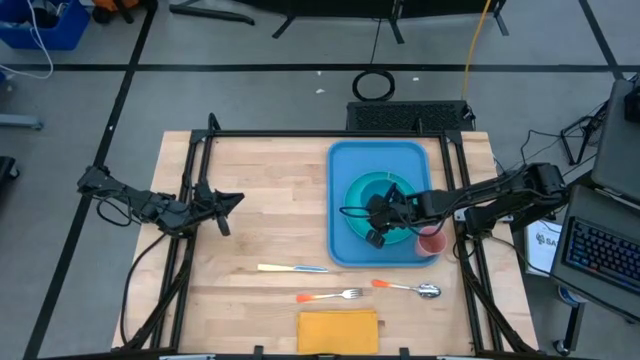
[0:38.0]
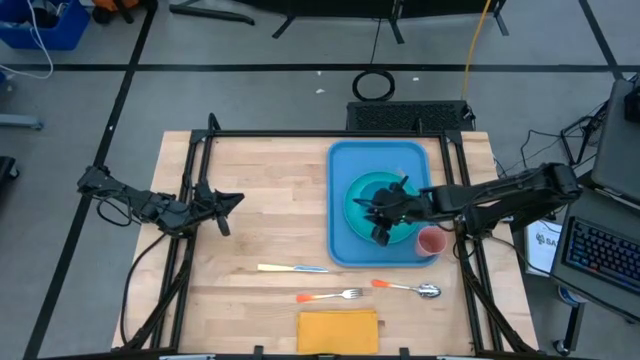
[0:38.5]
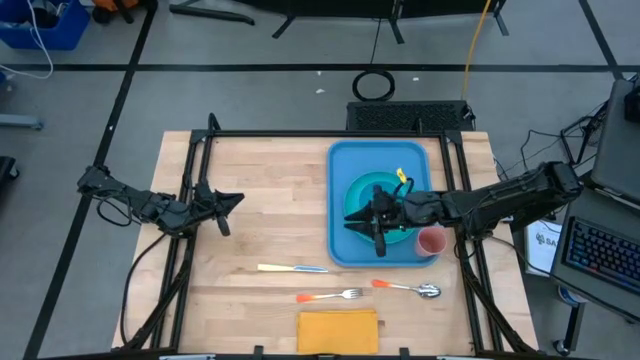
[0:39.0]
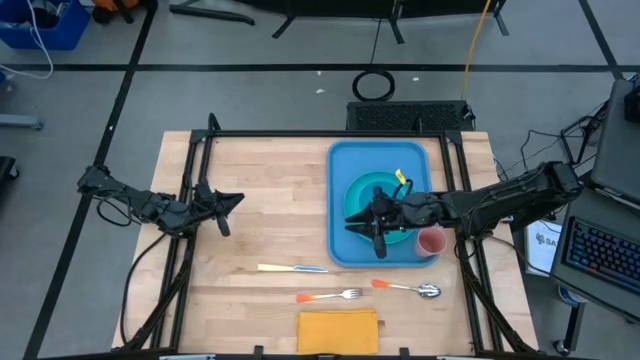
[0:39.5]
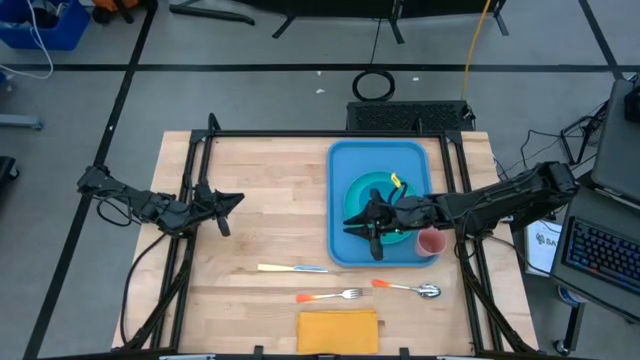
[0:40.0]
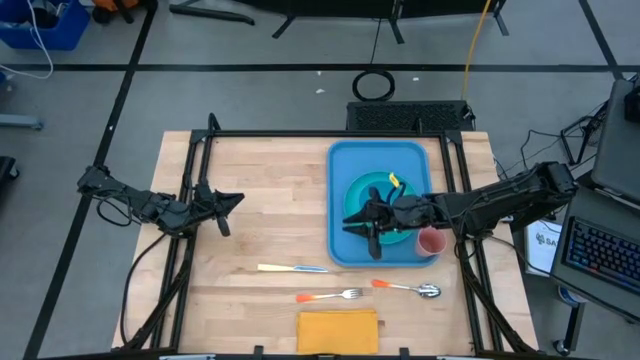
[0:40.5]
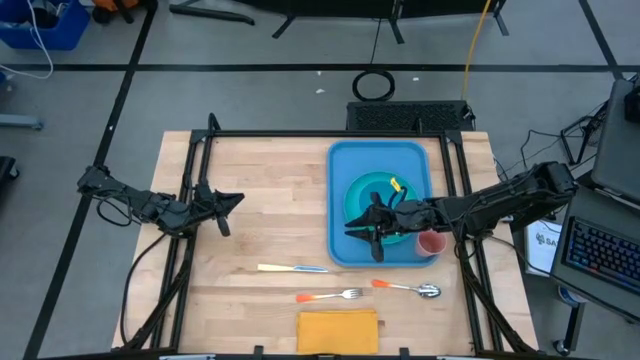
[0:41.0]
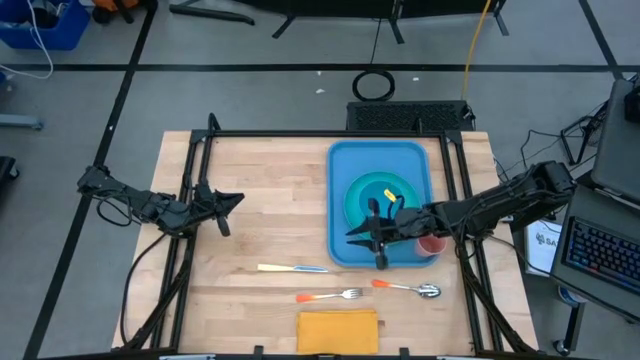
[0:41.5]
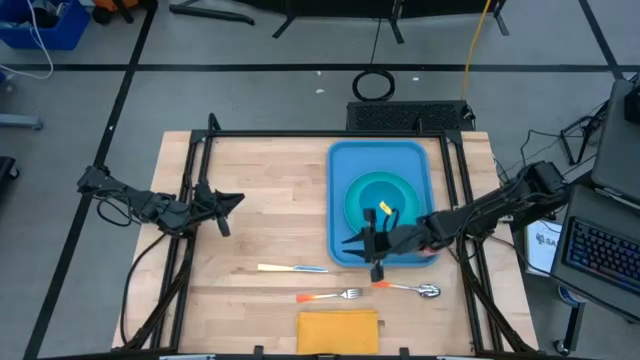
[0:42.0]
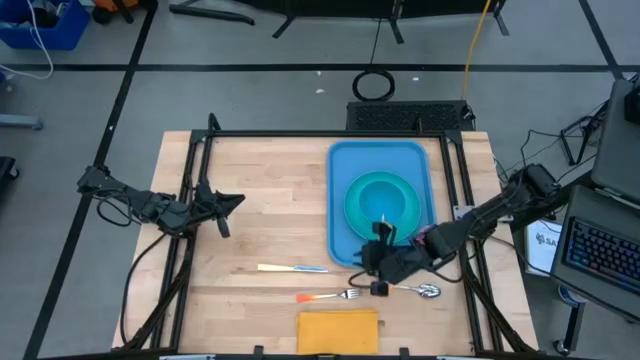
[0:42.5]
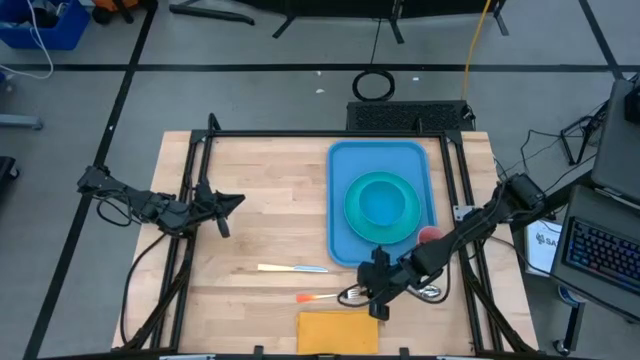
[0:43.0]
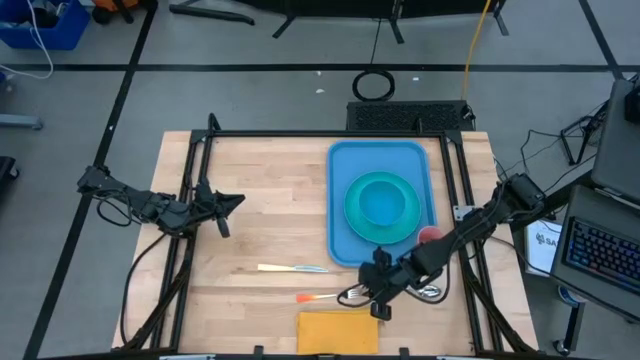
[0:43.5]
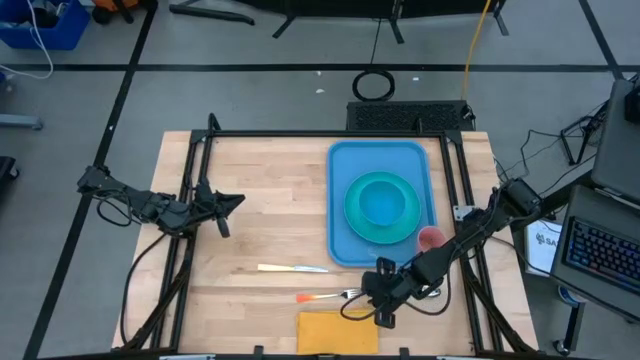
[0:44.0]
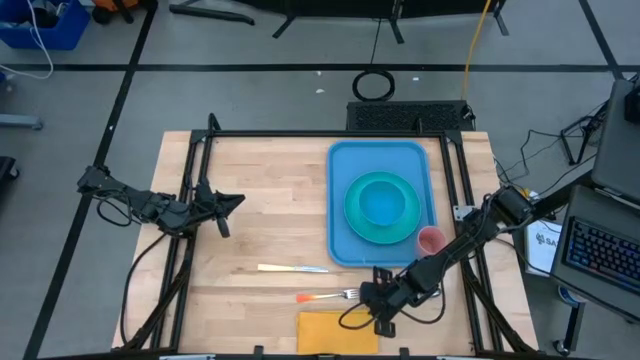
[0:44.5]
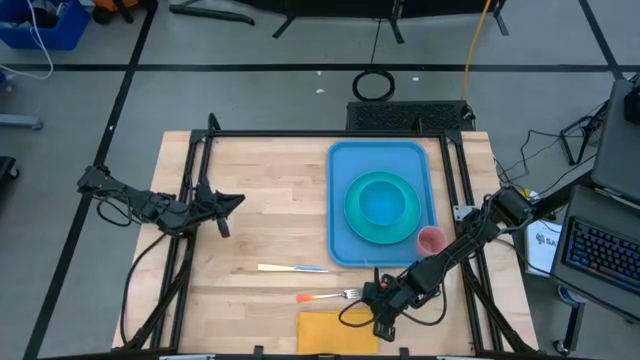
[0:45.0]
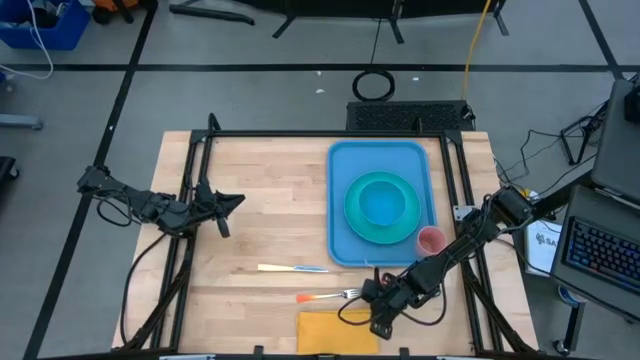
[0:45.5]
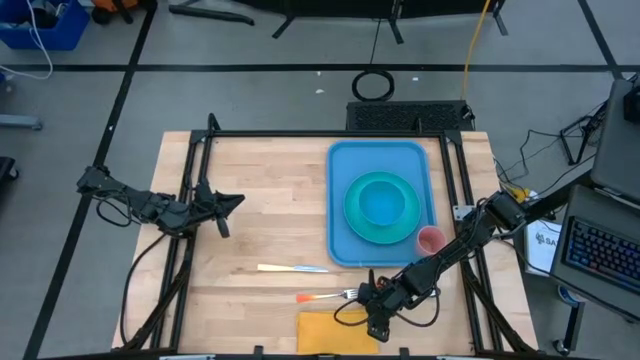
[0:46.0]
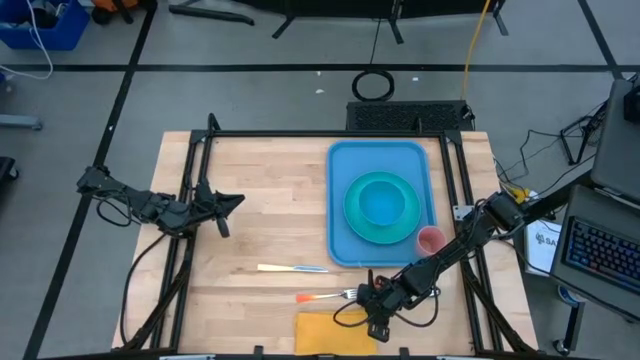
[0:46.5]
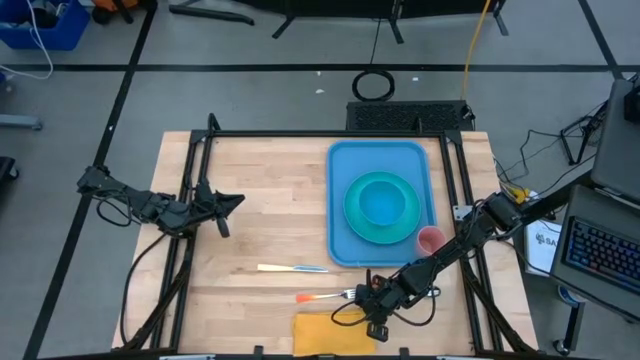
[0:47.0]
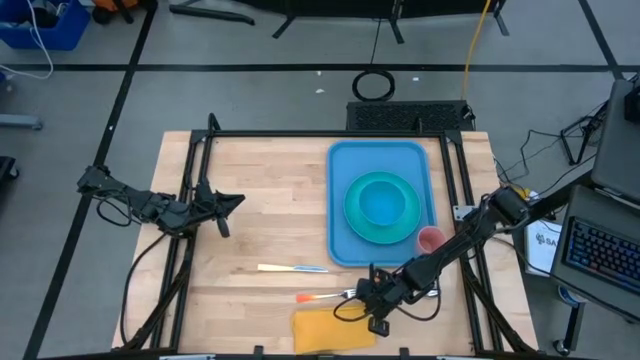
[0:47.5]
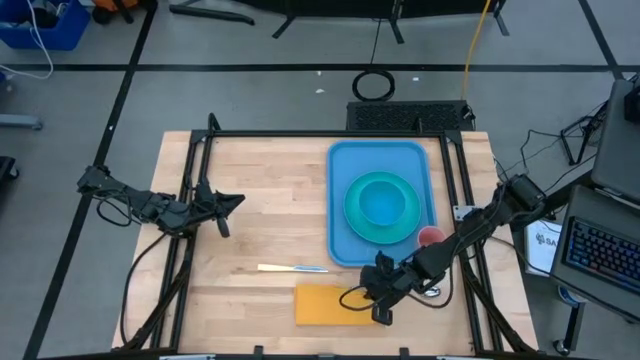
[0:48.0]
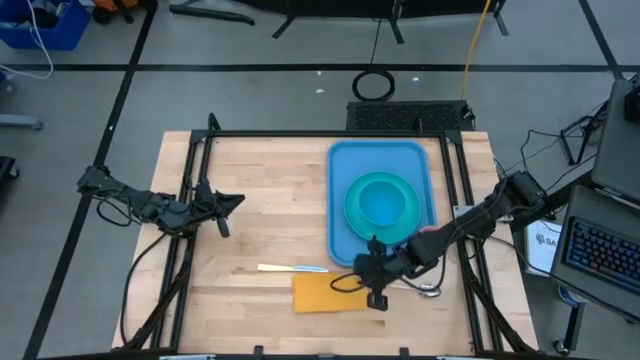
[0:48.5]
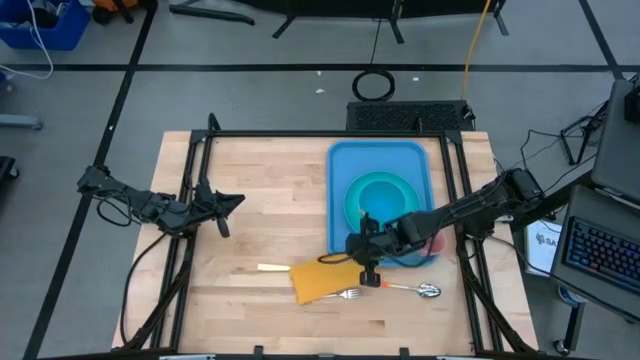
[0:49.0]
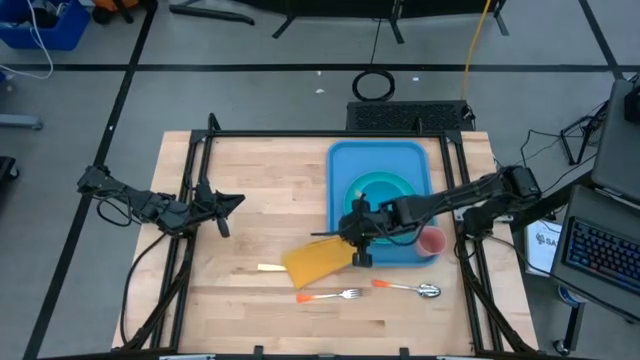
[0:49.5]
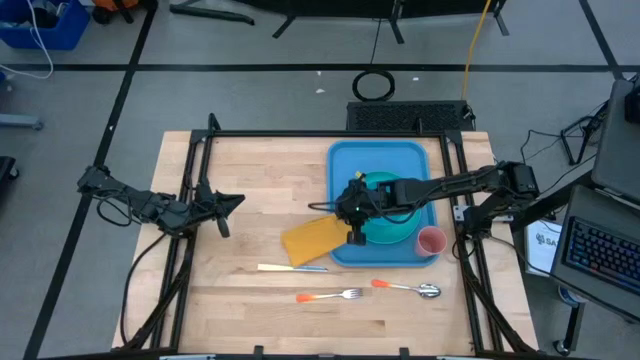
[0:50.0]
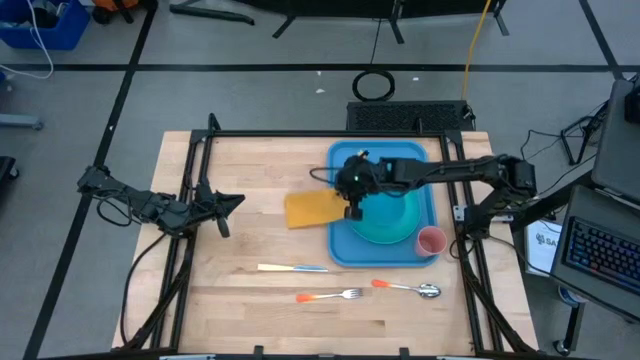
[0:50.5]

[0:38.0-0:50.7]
Task: Set up tray
Put the yellow table napkin to the left of the green plate on the blue serving tray

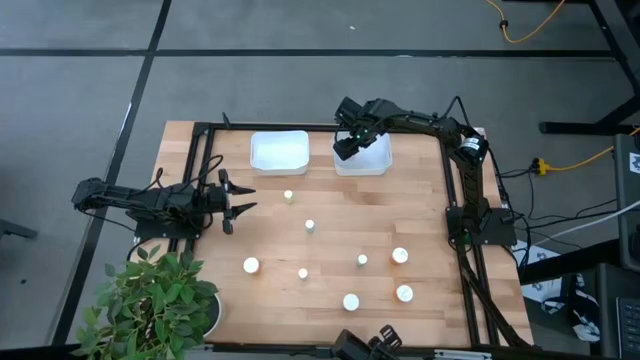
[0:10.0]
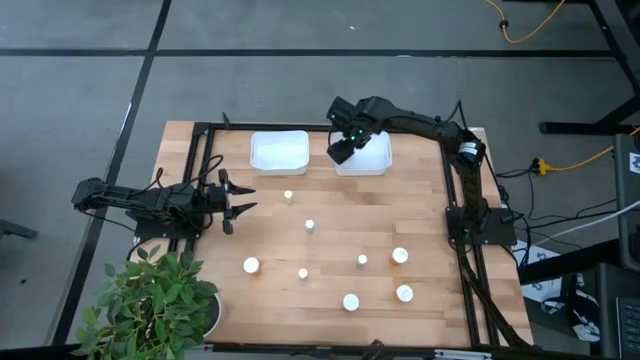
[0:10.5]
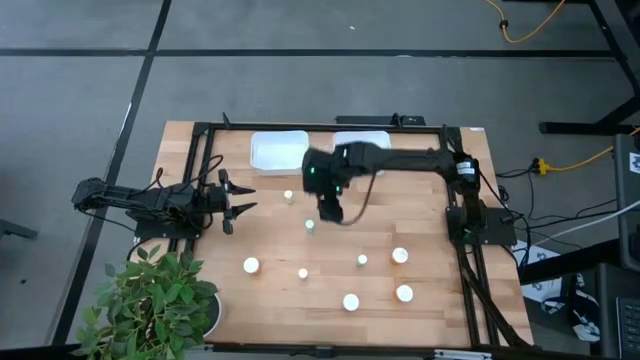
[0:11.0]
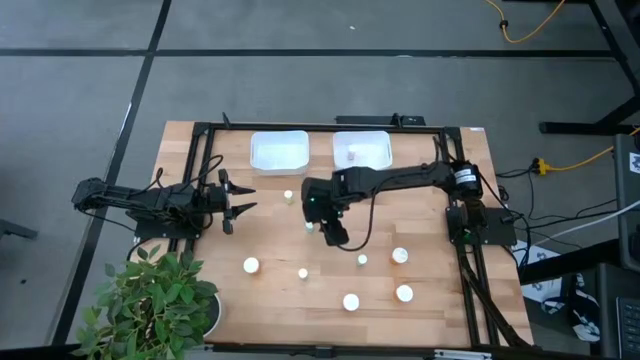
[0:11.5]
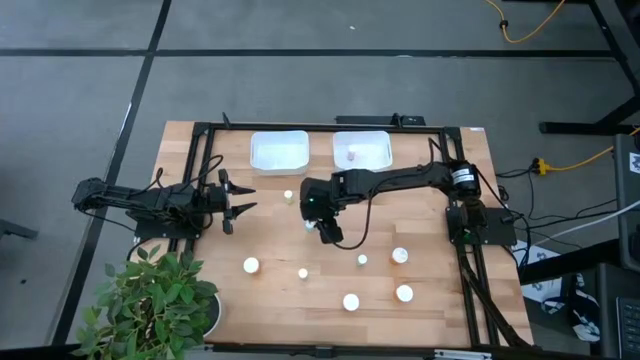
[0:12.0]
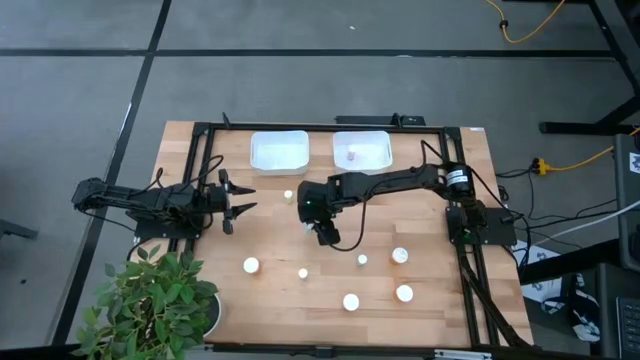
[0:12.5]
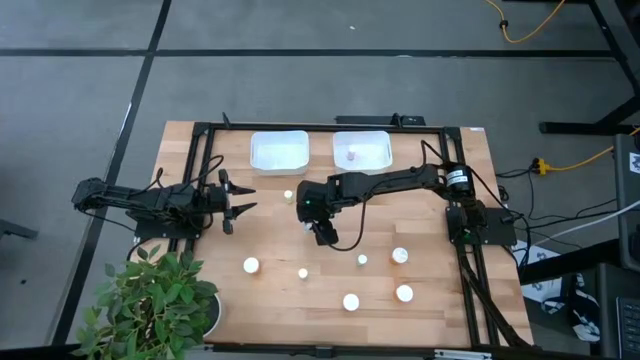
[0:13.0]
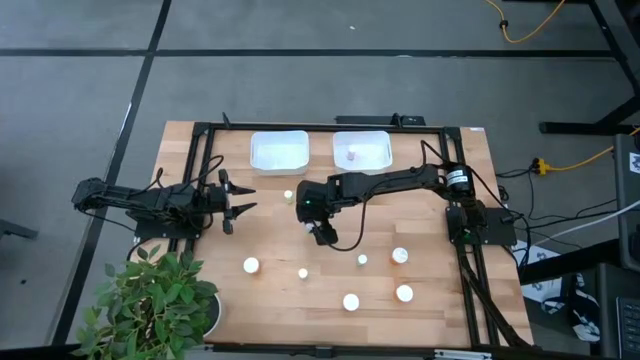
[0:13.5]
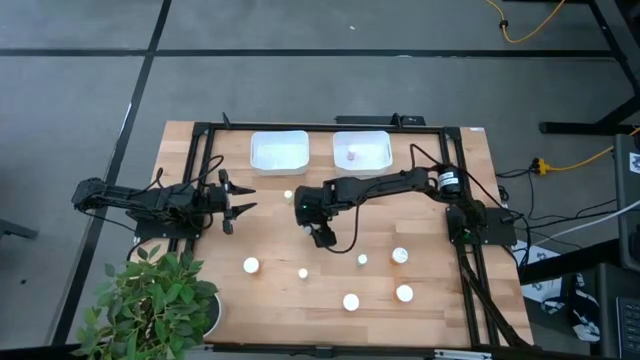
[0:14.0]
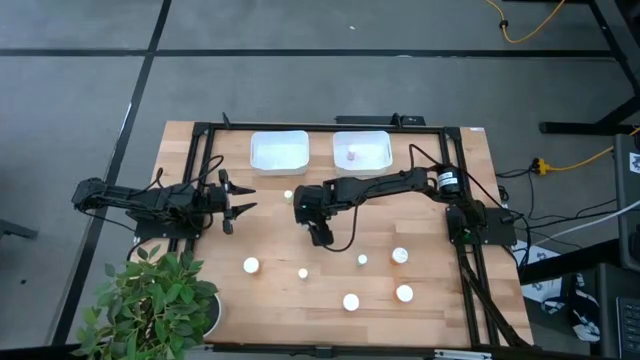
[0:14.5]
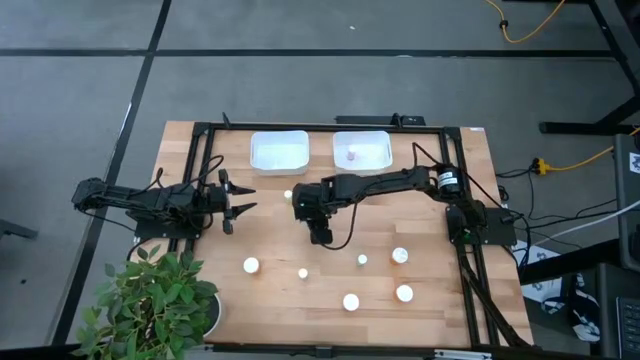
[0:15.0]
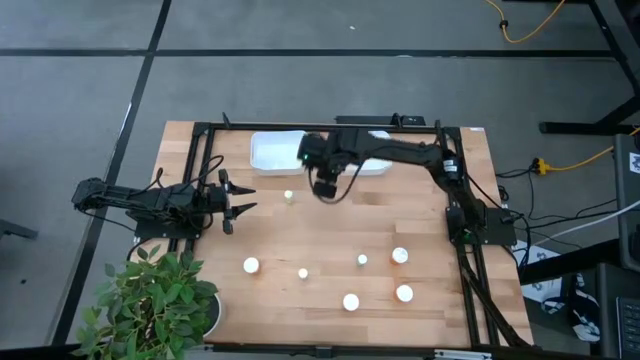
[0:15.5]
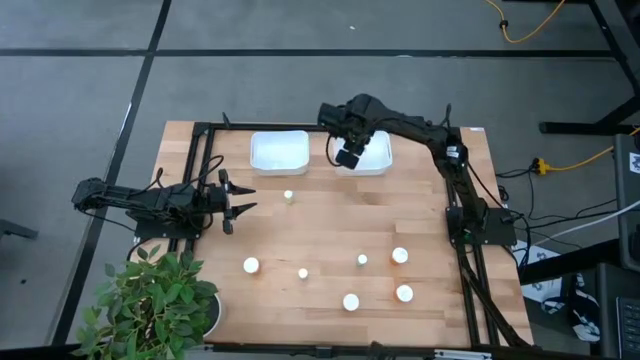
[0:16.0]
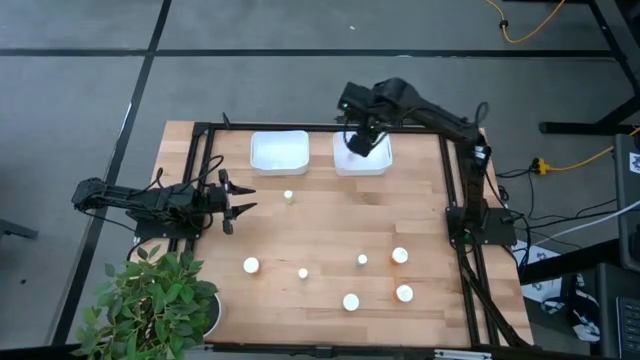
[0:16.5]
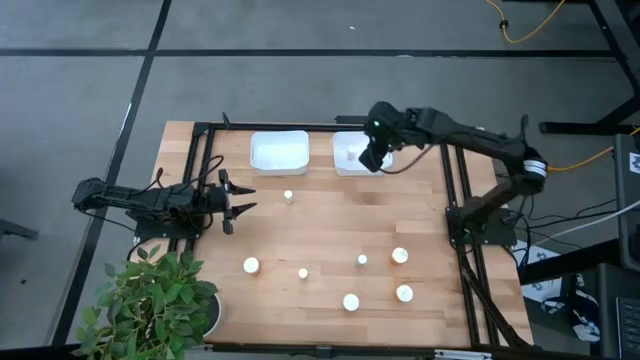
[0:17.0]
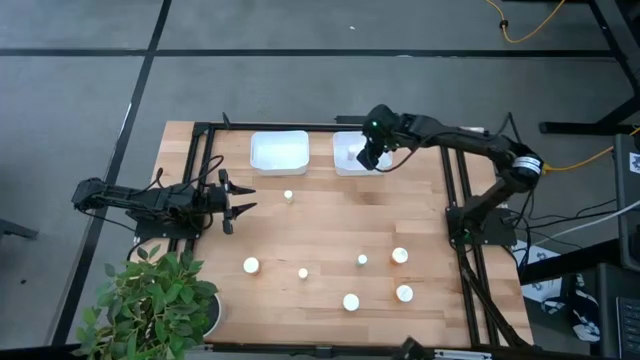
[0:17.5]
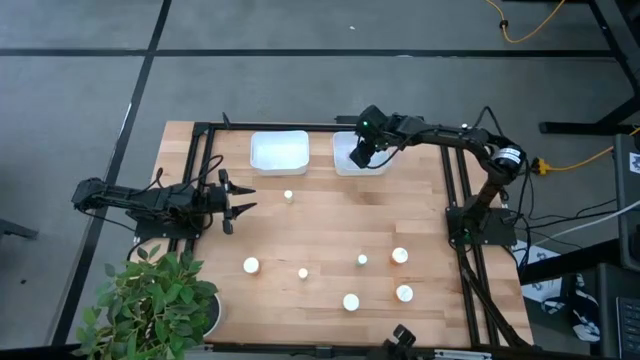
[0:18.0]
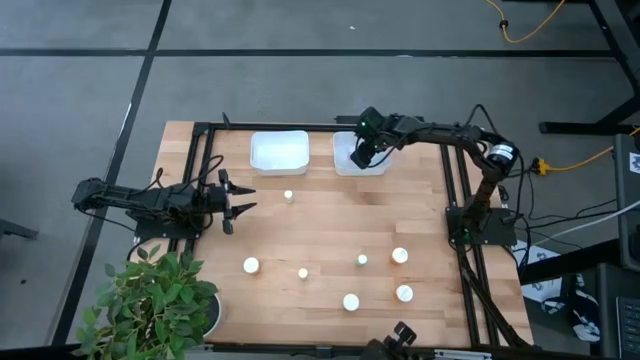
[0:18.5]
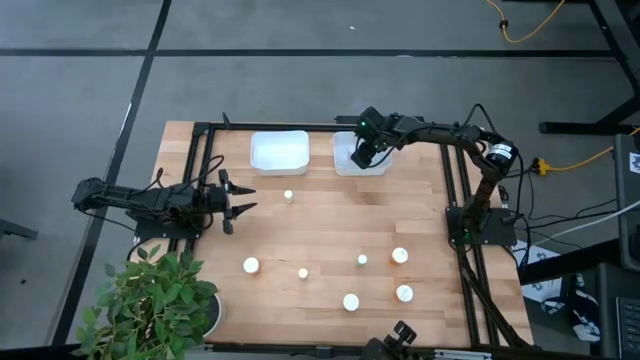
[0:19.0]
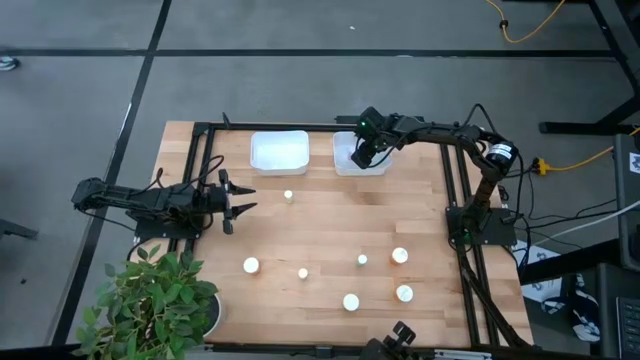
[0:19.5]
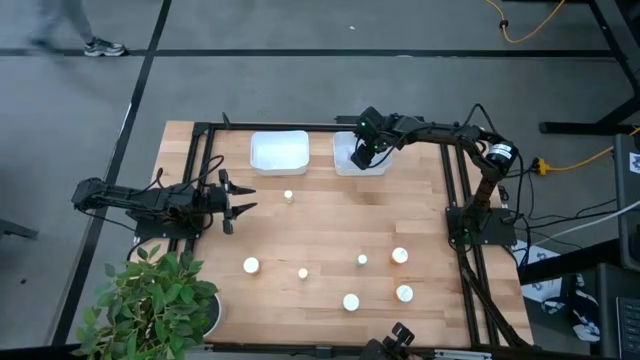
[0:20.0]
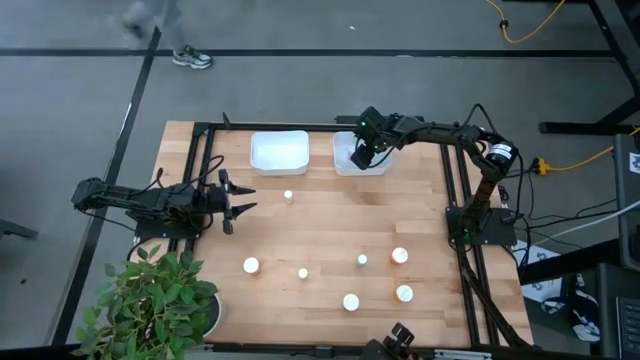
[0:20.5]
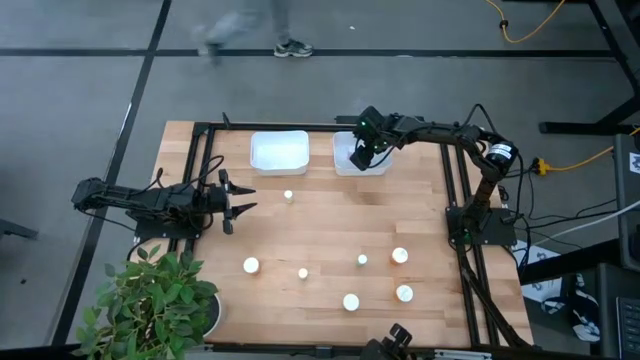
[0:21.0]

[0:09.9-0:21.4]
Task: Pick and place medicine bottles into bin by pill shape (circle, oval)
Put the blue pill bottle into the right white bin
